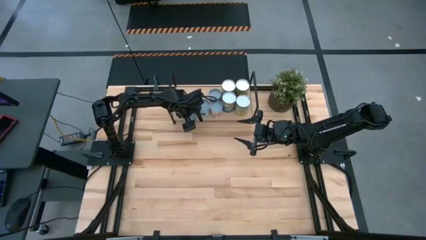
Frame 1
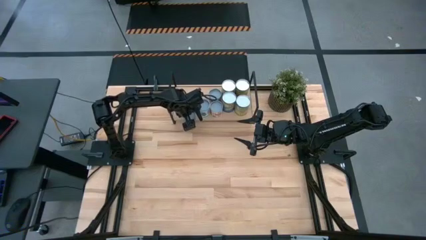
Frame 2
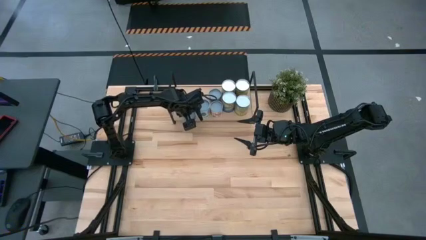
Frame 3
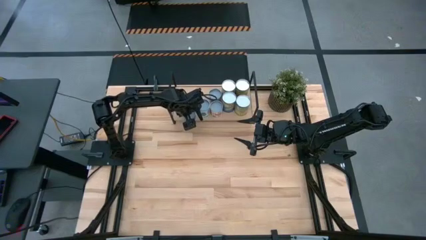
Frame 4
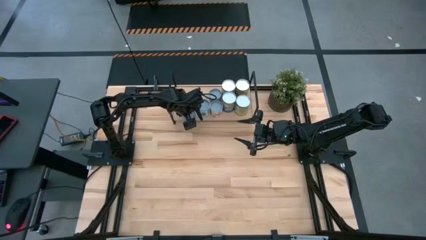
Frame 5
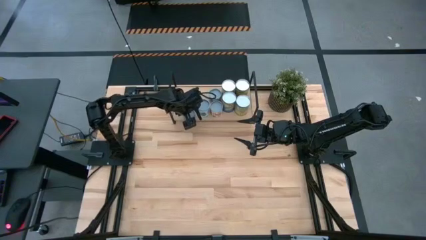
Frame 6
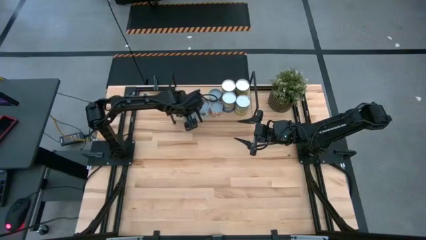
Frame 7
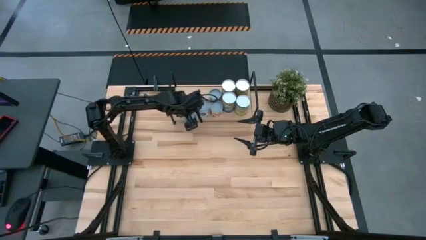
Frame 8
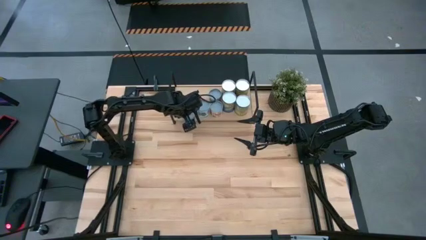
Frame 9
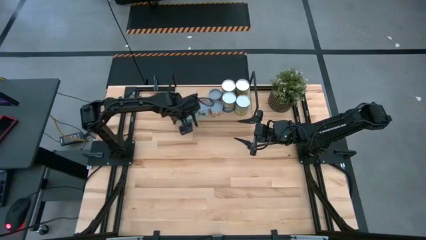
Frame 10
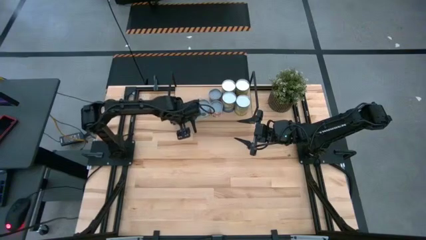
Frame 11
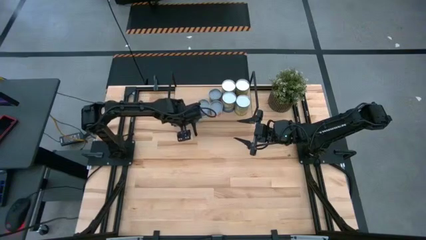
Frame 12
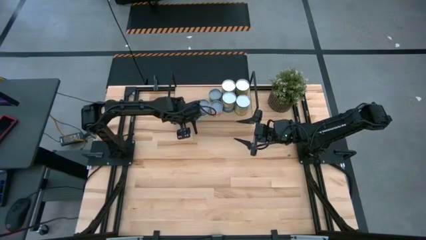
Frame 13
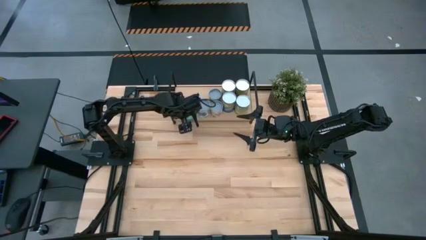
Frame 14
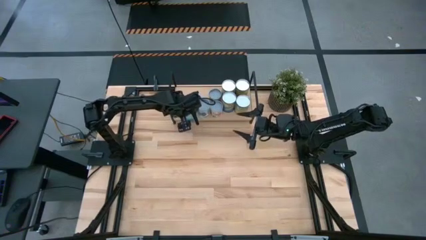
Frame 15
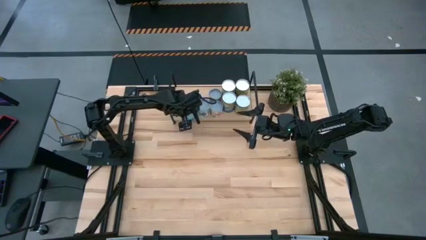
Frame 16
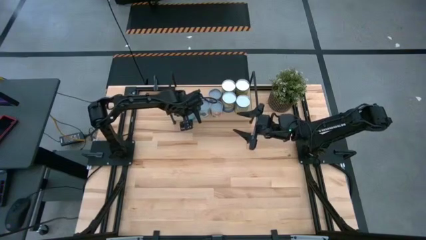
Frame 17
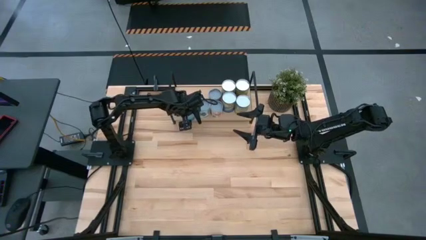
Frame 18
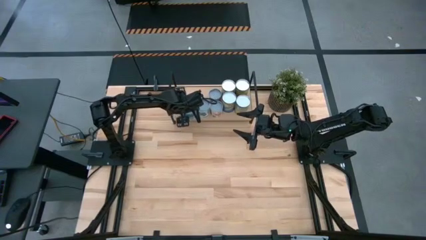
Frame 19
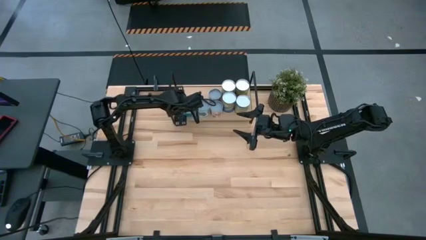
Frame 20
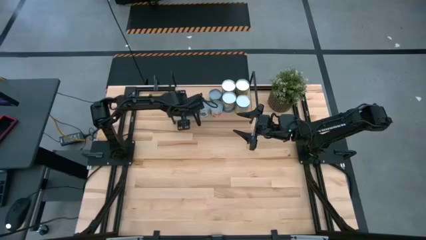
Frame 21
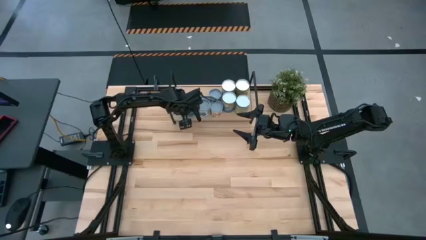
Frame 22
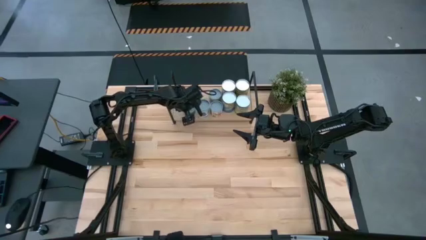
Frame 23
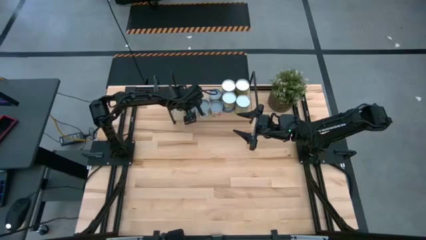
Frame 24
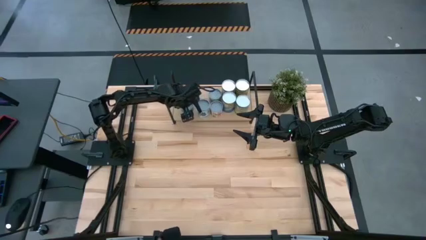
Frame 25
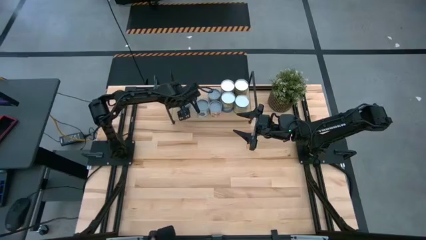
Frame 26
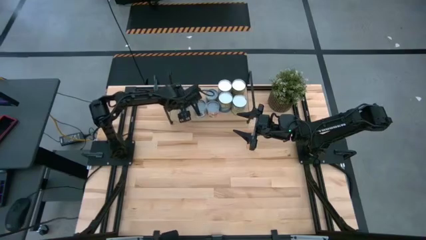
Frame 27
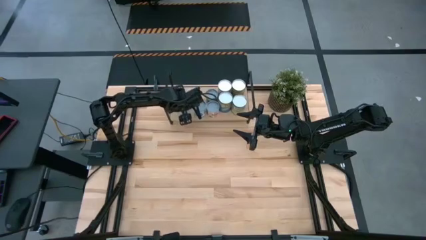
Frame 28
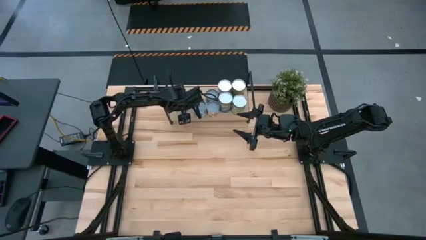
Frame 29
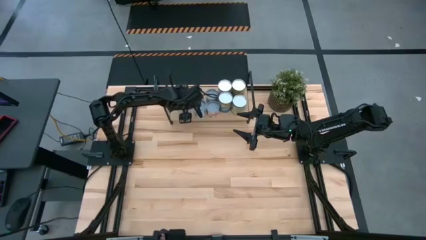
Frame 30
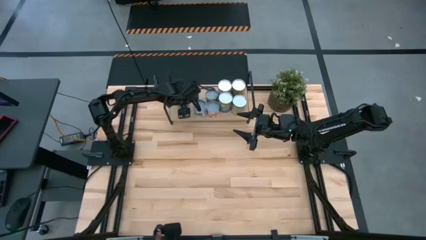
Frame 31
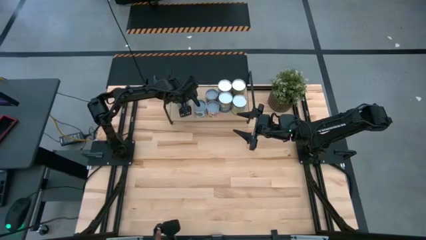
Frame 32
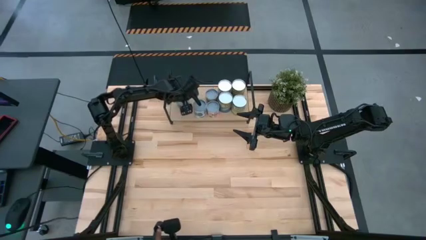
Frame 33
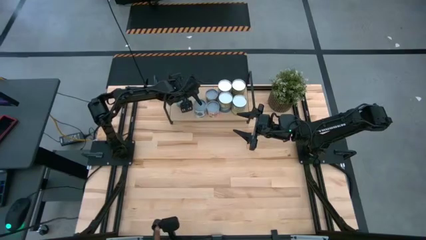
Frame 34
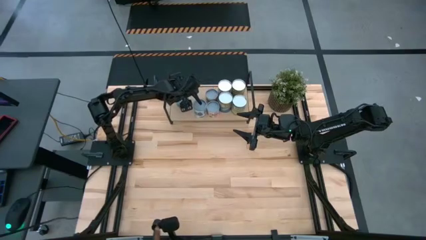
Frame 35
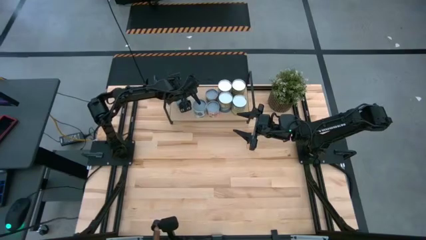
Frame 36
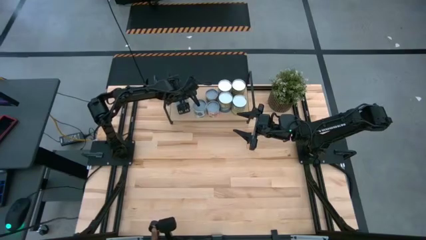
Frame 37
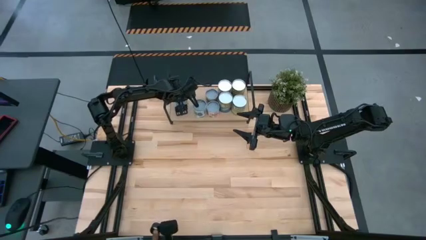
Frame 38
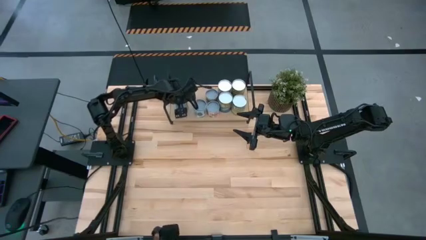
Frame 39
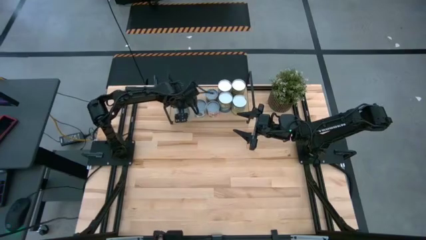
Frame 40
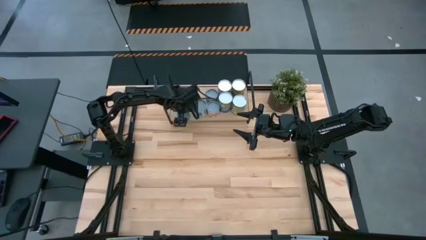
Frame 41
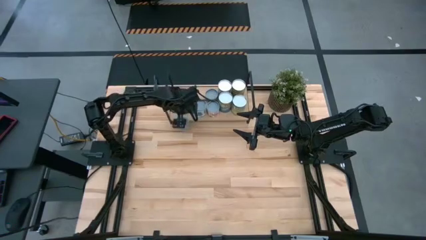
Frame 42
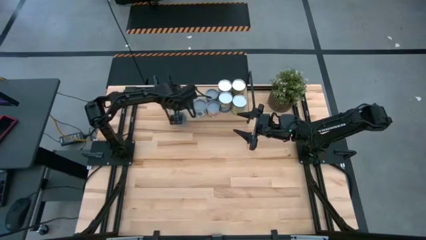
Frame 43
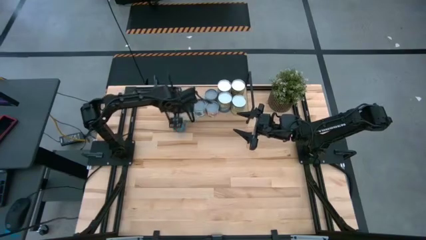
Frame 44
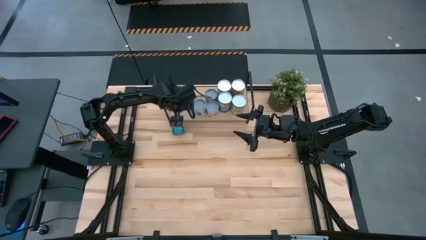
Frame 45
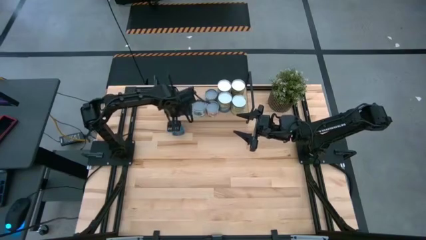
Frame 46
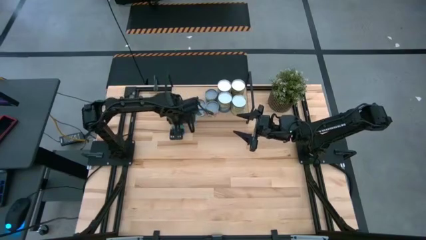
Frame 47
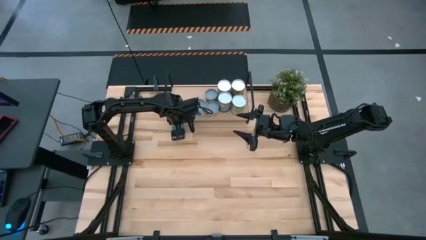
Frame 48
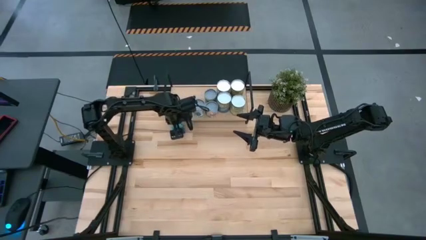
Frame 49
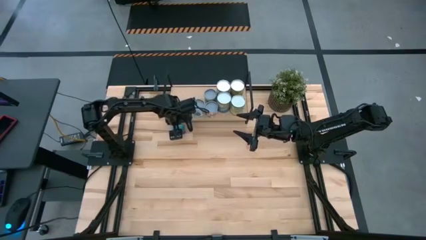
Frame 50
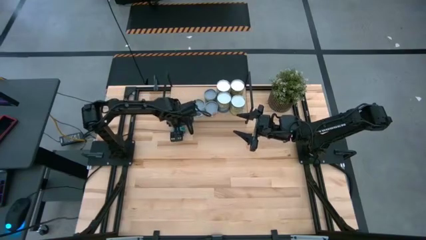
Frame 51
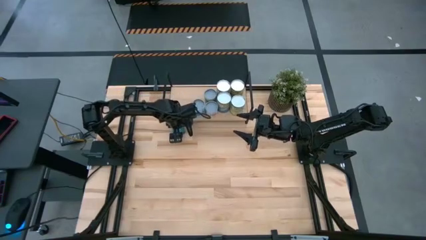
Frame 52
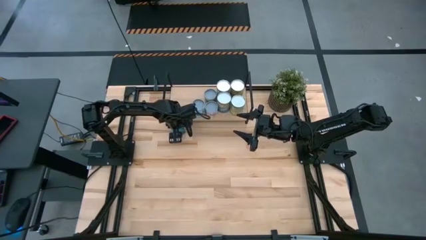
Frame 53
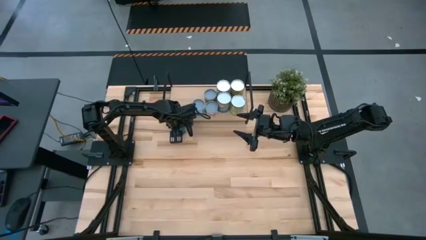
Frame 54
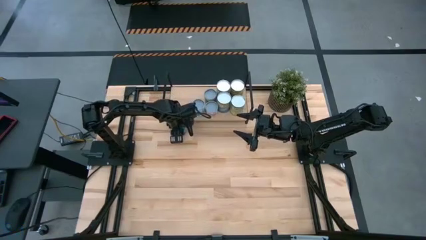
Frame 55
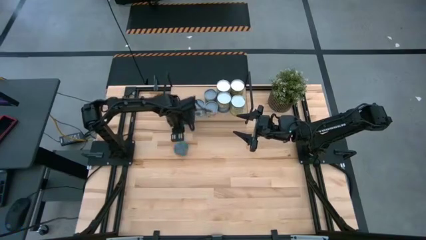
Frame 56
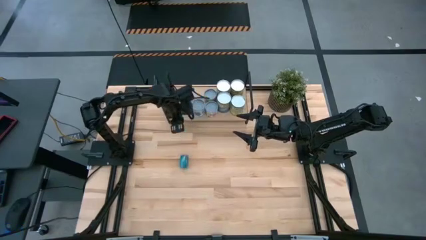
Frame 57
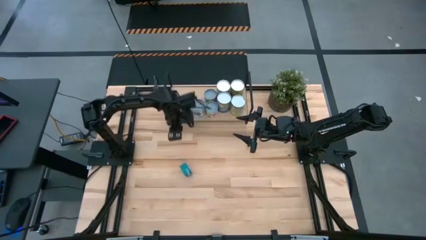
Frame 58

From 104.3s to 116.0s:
Task: Pick and place cans onto a shelf
Put the green tuna can on the shelf
